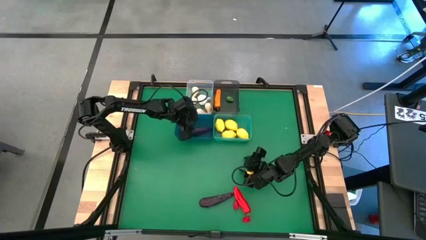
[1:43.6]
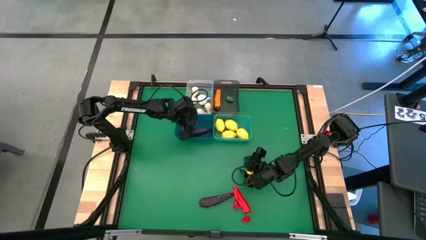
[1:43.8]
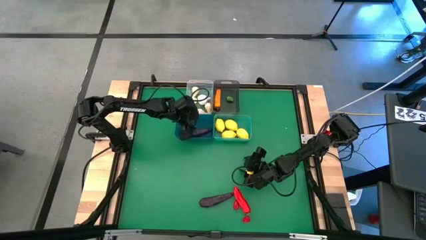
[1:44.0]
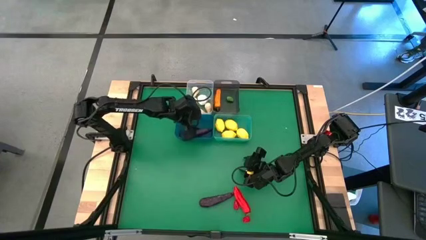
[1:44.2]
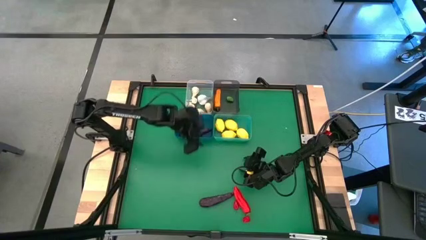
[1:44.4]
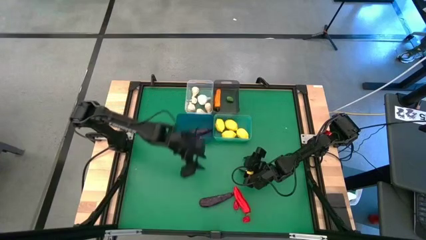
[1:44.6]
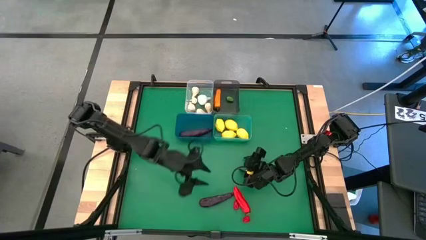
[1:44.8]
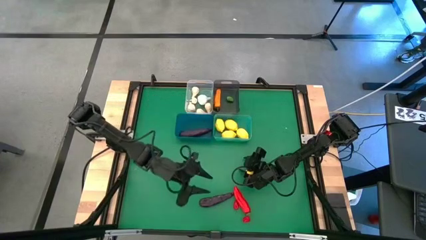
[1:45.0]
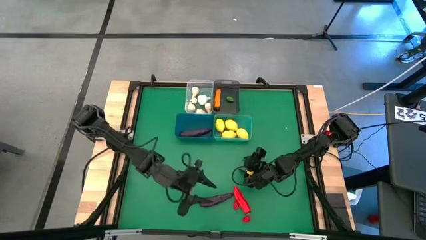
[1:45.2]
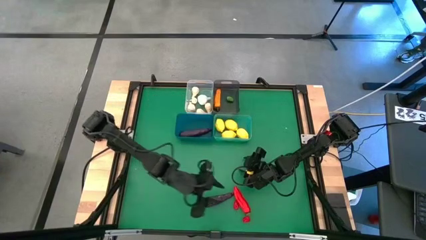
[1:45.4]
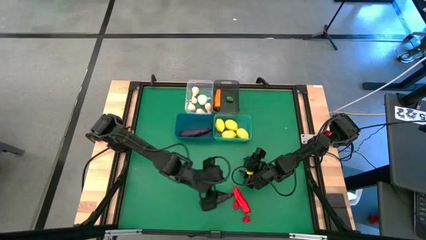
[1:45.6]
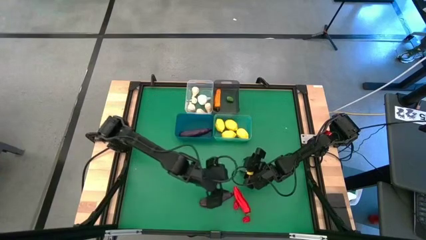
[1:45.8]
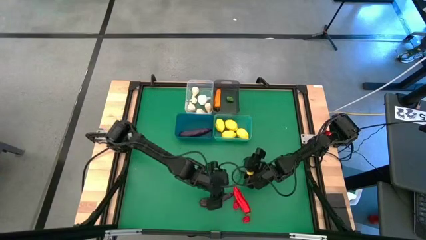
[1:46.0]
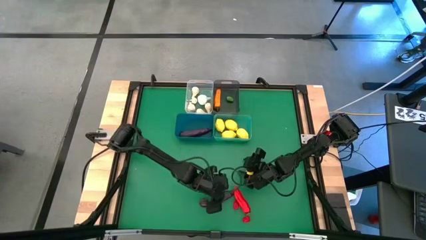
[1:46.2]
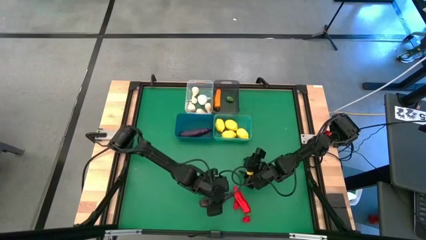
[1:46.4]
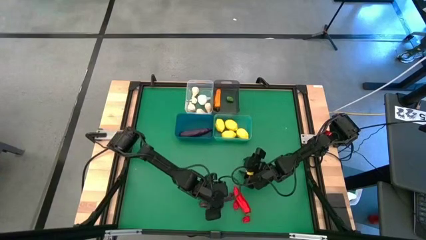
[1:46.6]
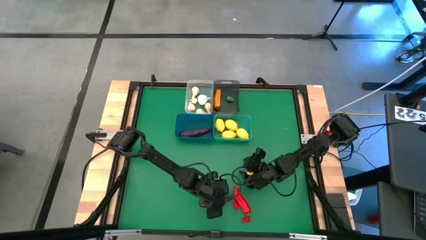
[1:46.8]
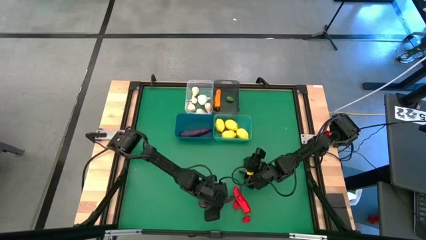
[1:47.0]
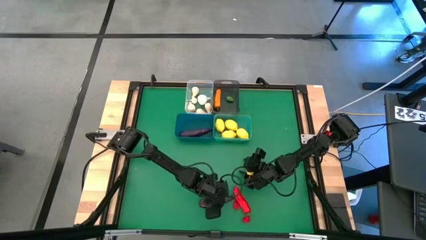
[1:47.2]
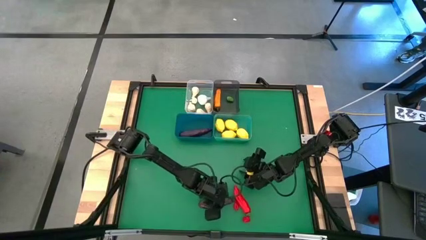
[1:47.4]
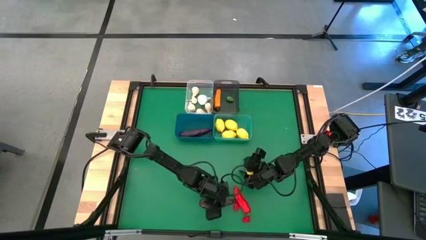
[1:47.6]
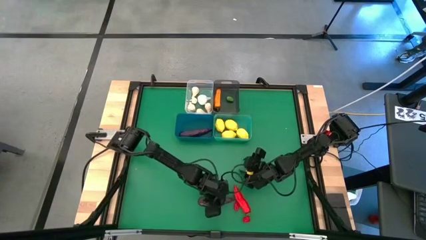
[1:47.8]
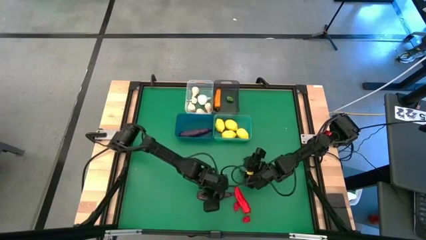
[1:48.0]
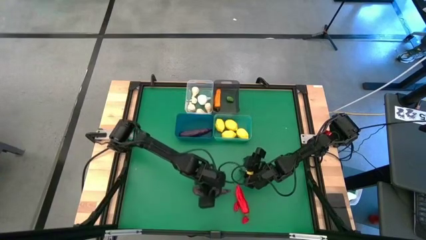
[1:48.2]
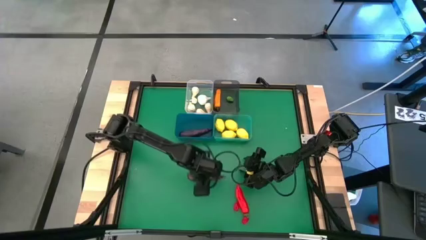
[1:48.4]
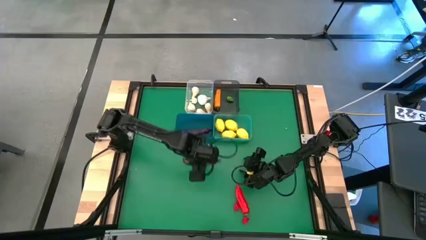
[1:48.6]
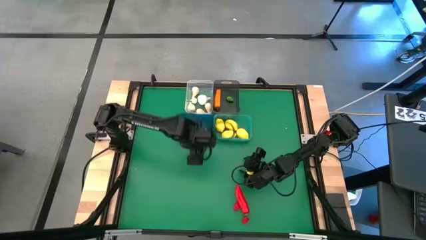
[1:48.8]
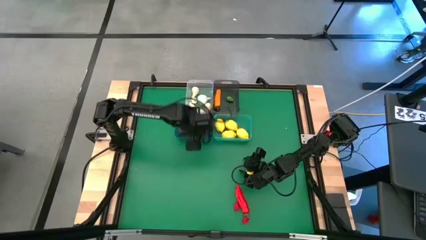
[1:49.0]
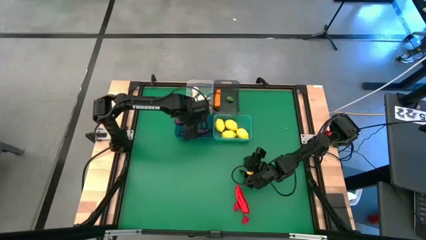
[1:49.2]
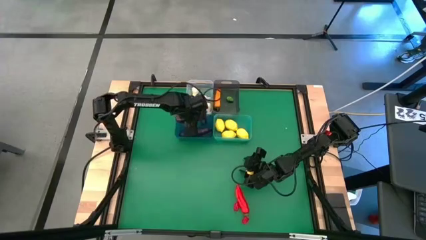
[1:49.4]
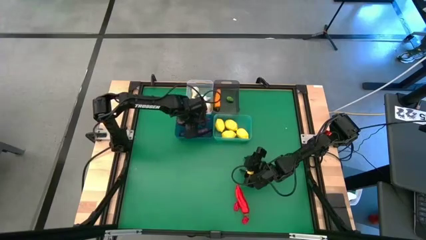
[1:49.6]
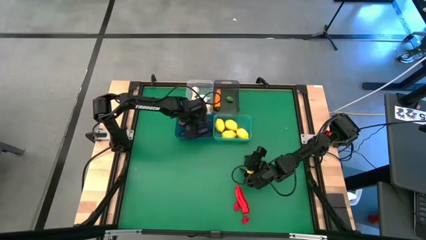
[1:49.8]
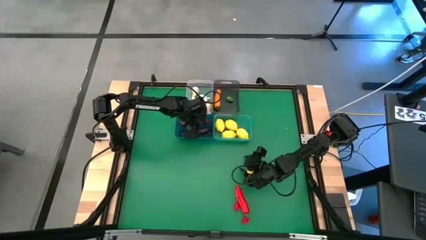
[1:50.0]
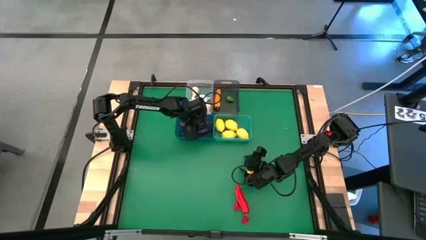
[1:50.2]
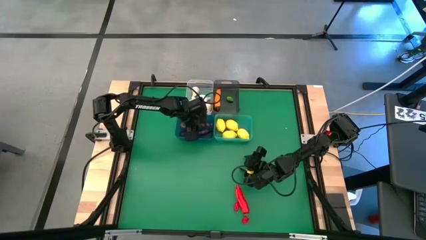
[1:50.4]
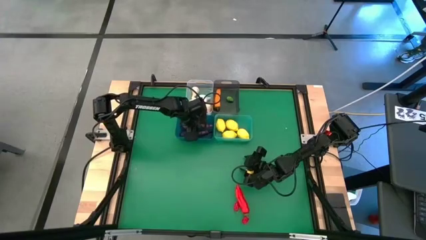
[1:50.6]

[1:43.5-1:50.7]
Task: Sort produce into baskets
Put the violet eggplant into the blue bin

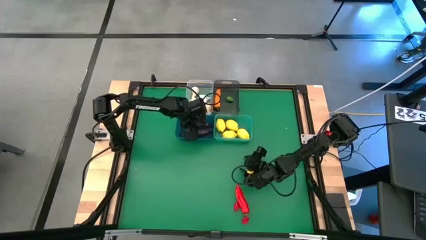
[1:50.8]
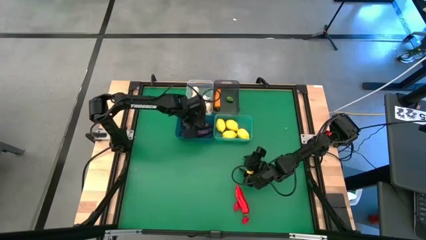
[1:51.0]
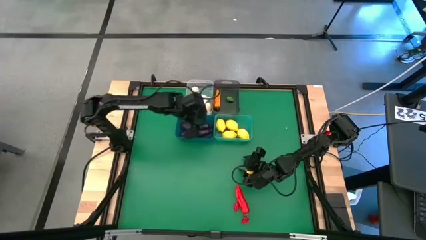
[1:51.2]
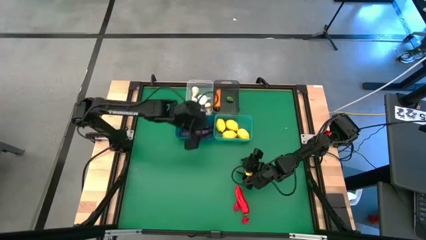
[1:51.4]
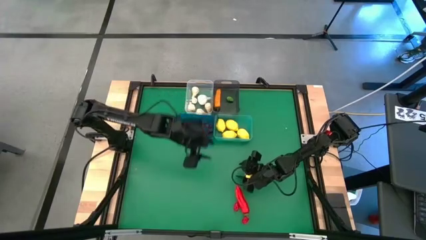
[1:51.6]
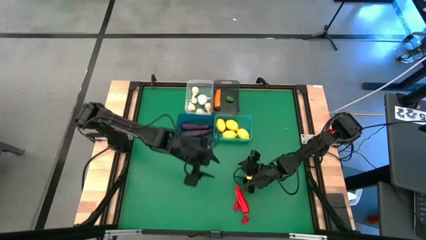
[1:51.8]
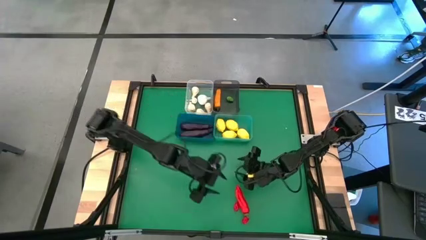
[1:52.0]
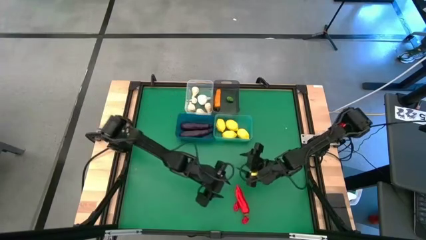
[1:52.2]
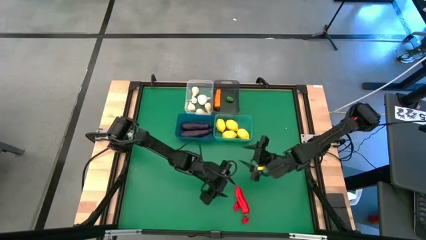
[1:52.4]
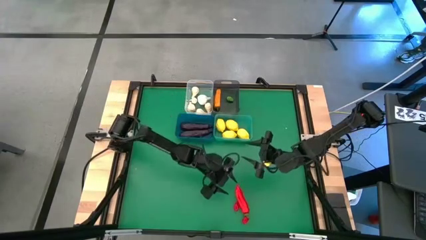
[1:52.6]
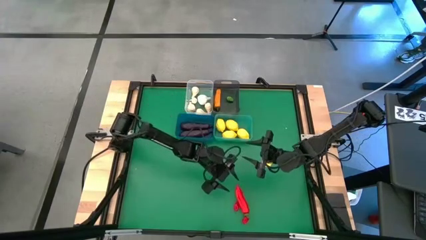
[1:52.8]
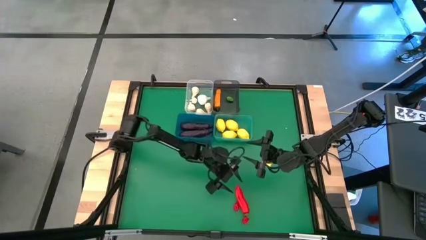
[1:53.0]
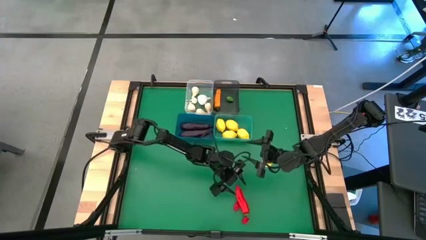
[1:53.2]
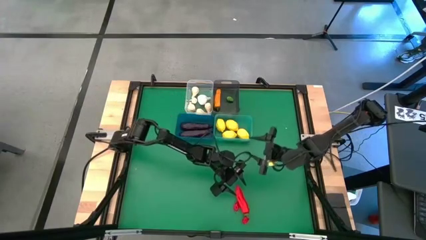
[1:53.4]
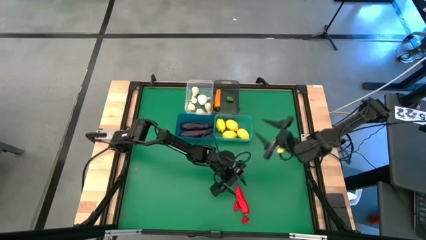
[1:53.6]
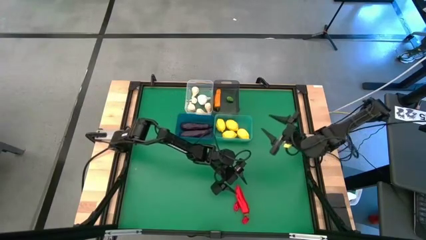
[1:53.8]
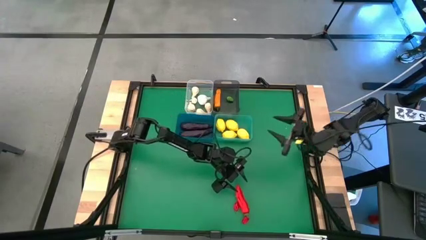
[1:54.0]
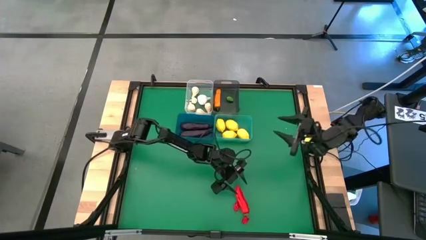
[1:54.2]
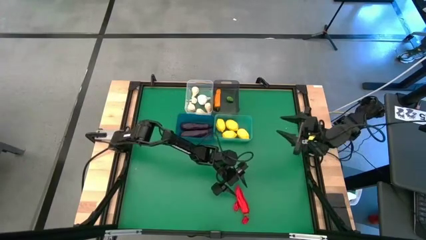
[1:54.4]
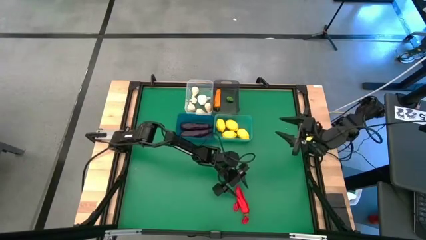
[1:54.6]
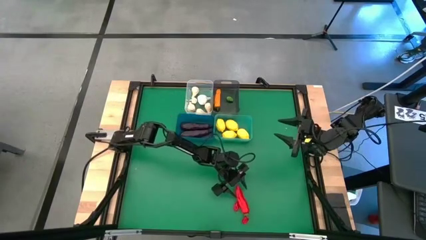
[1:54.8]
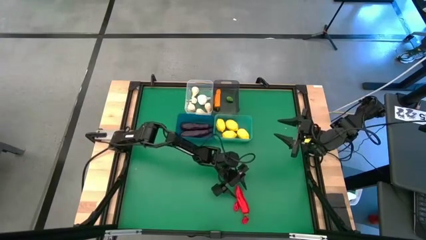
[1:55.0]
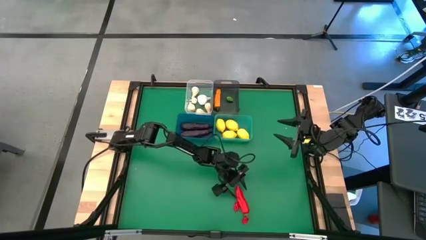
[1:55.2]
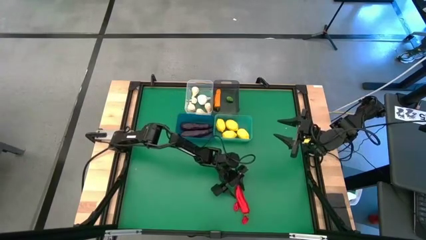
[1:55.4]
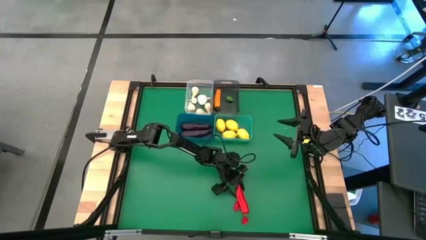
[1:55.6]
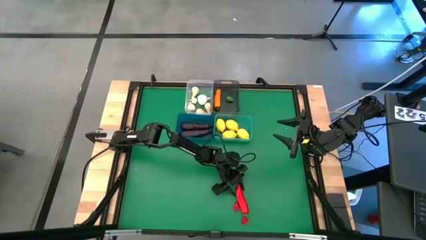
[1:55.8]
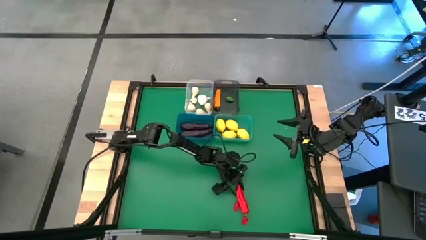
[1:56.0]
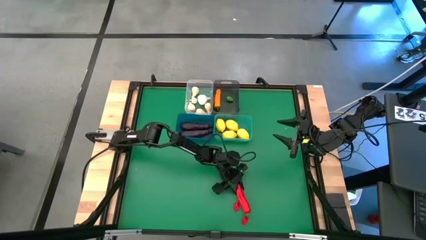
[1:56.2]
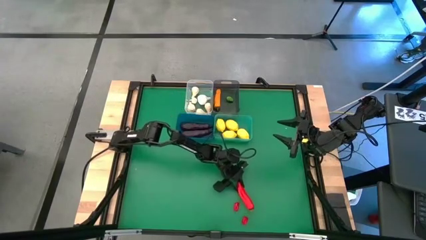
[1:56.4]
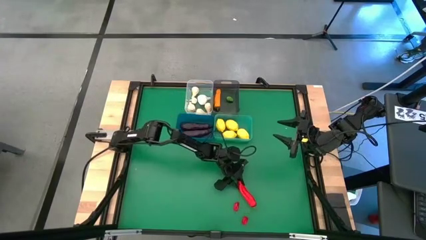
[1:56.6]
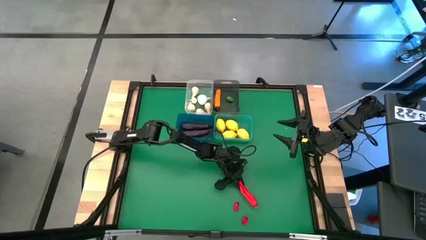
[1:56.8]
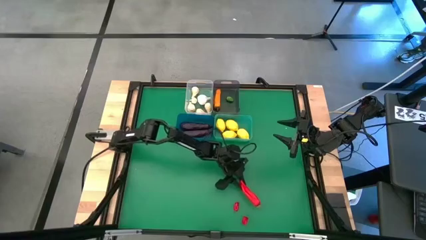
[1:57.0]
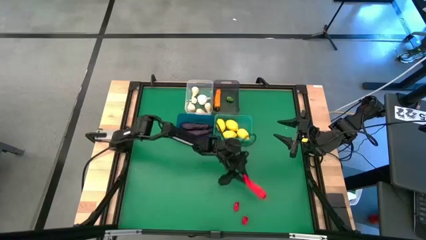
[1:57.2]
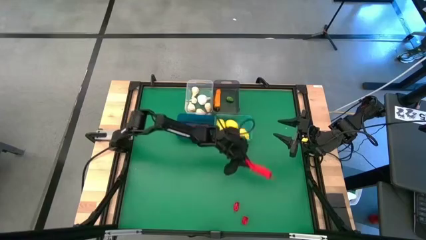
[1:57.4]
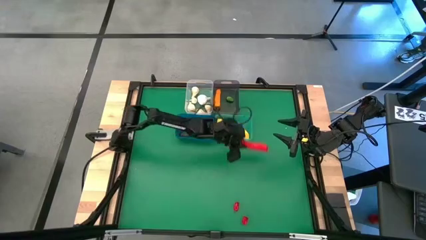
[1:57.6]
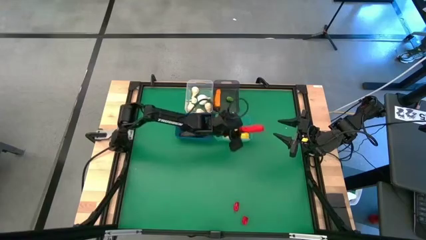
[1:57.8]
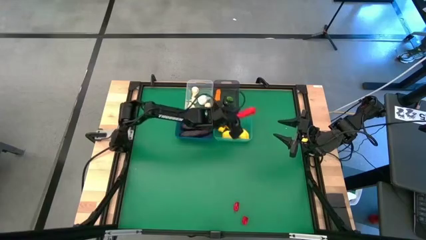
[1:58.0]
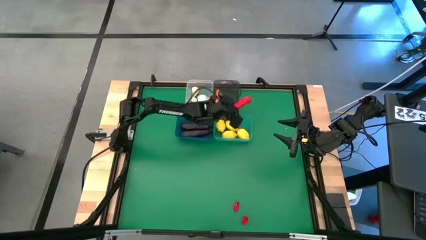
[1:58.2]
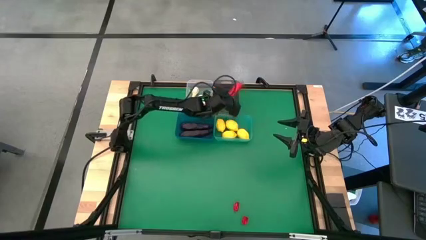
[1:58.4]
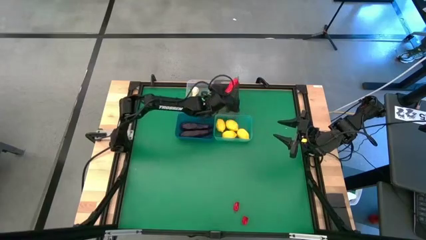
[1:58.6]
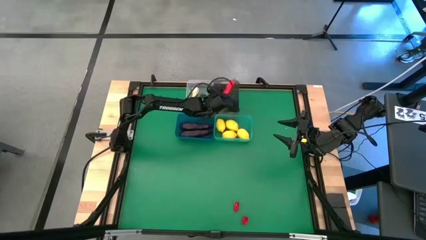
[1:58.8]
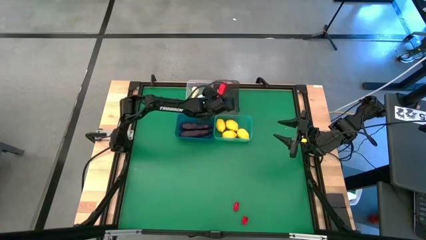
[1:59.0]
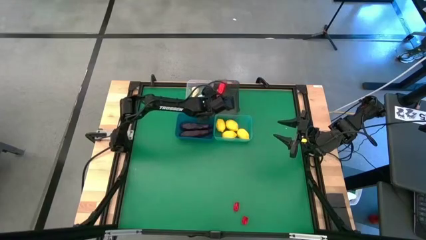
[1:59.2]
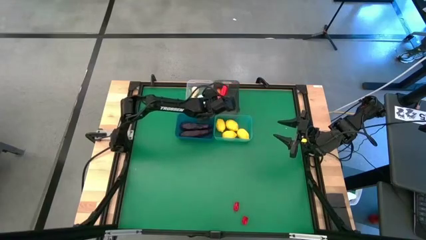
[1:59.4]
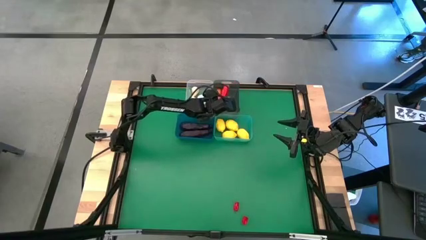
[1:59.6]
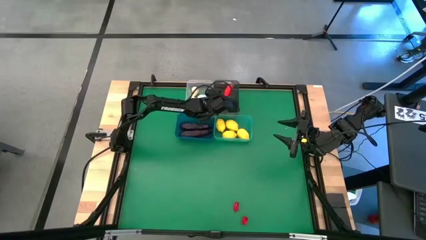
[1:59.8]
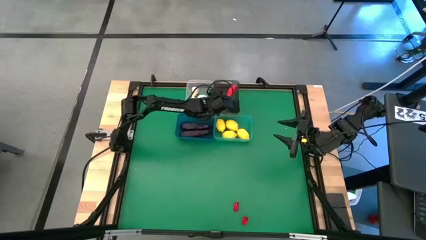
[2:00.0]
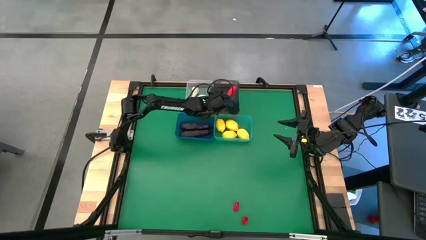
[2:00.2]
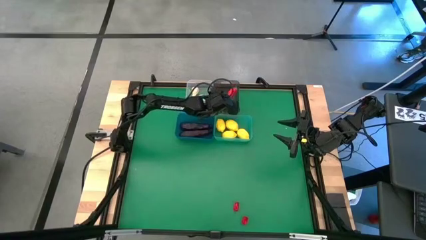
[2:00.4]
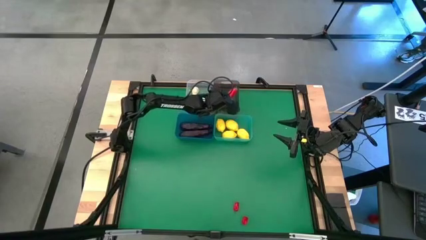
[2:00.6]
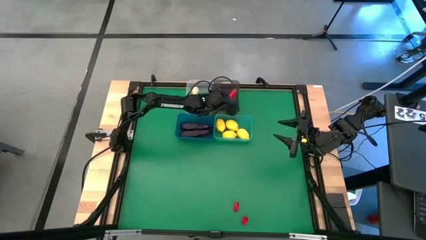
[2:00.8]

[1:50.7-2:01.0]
Put the red chili pepper into the black bin
